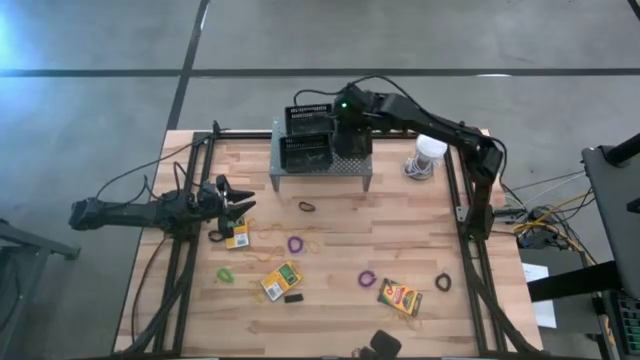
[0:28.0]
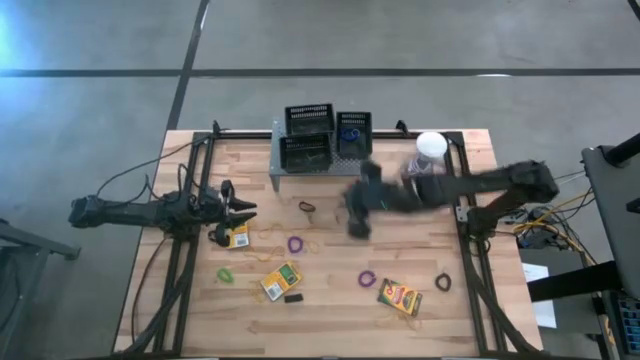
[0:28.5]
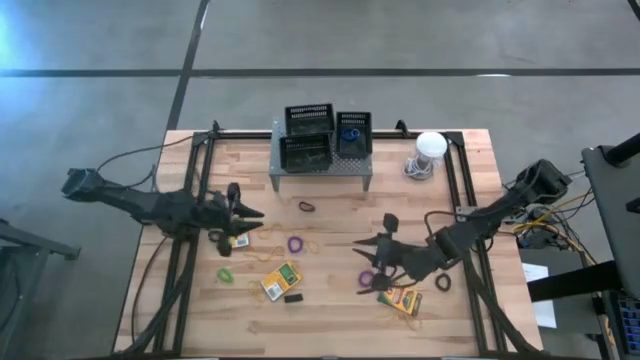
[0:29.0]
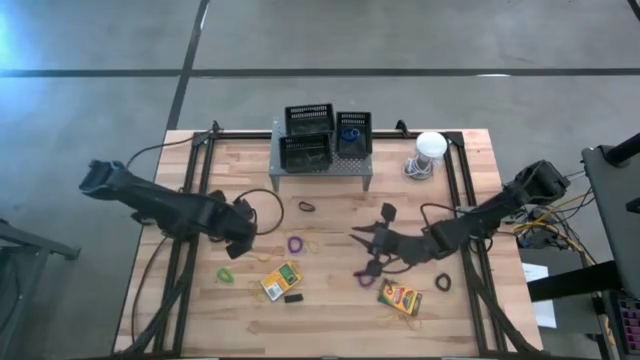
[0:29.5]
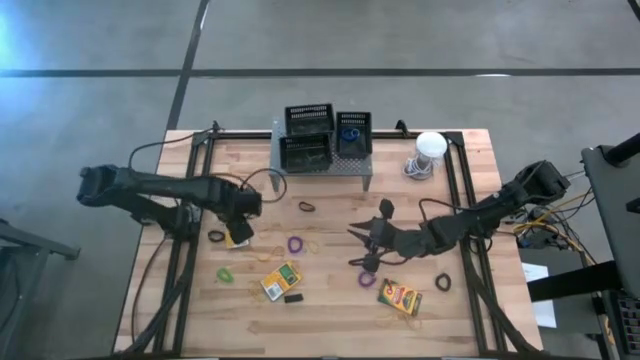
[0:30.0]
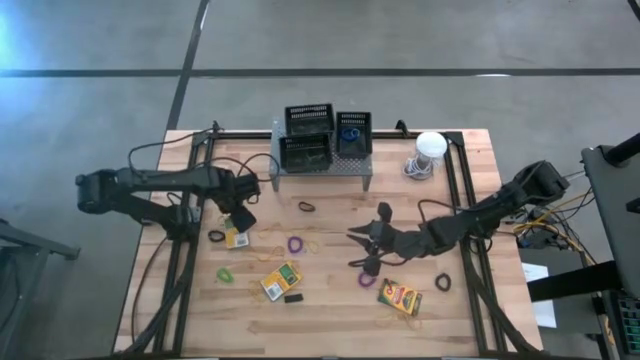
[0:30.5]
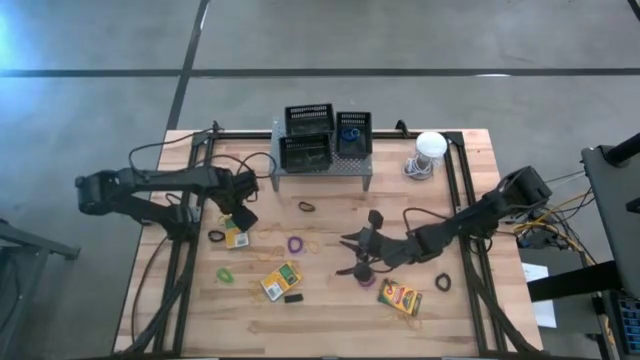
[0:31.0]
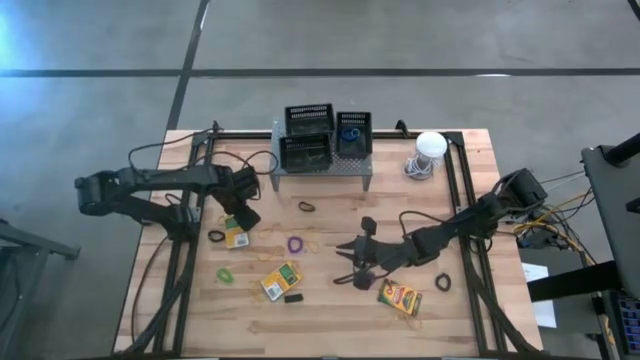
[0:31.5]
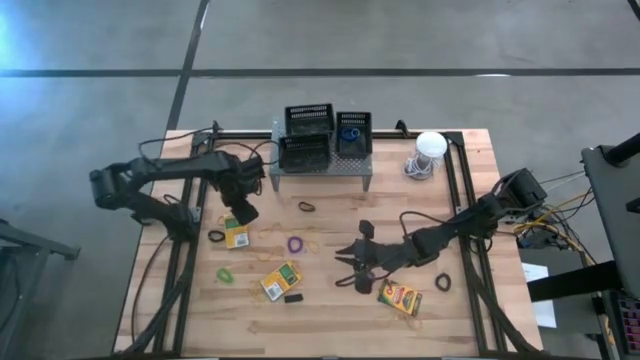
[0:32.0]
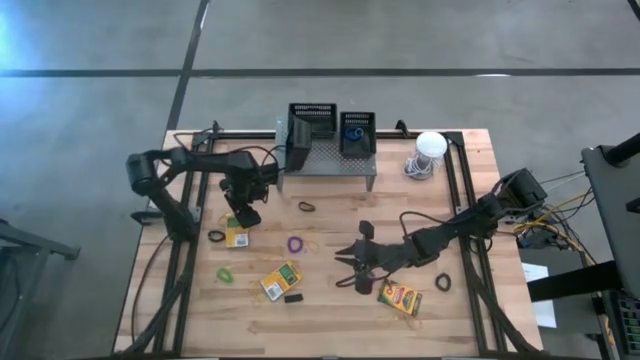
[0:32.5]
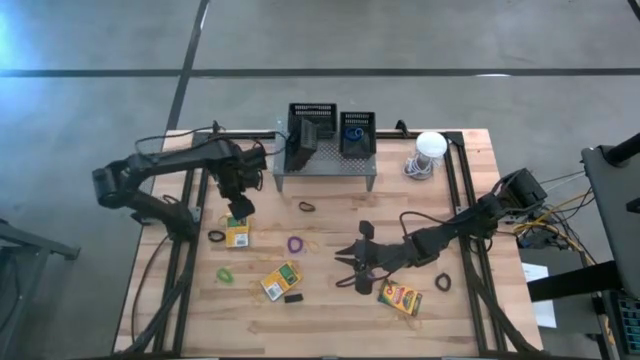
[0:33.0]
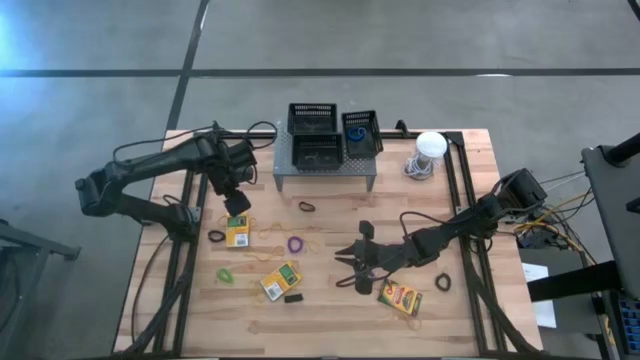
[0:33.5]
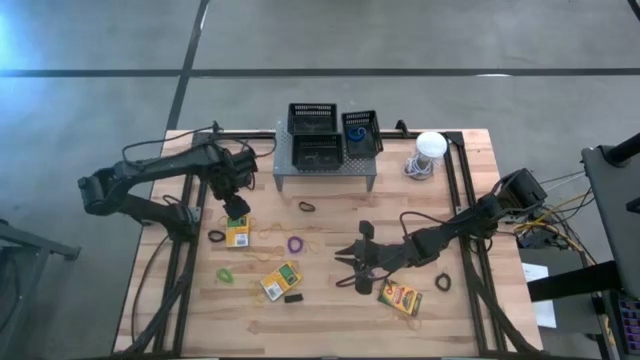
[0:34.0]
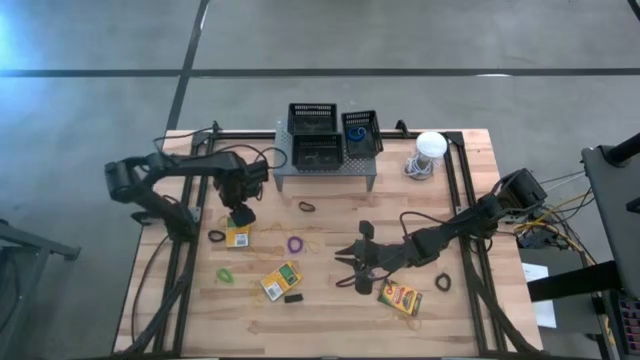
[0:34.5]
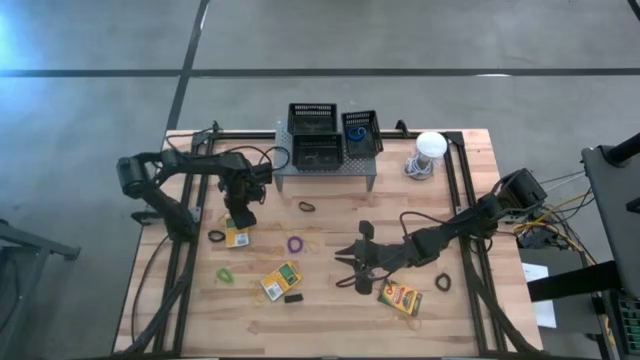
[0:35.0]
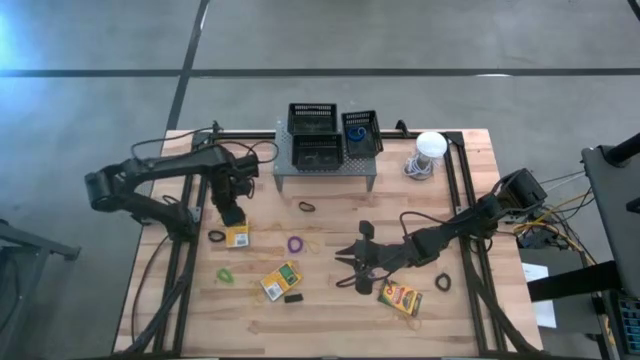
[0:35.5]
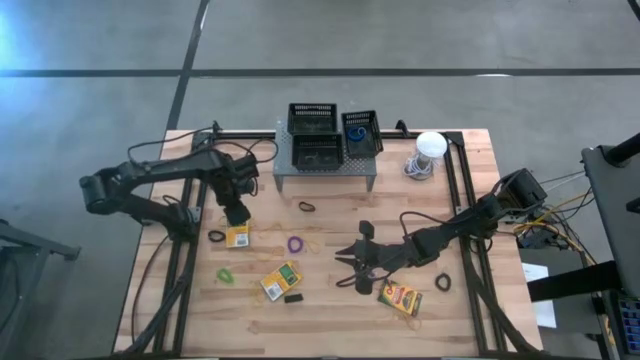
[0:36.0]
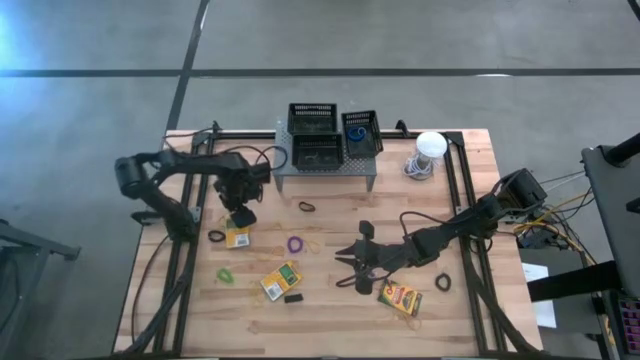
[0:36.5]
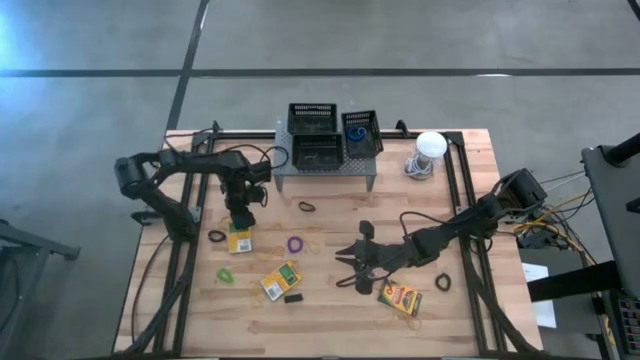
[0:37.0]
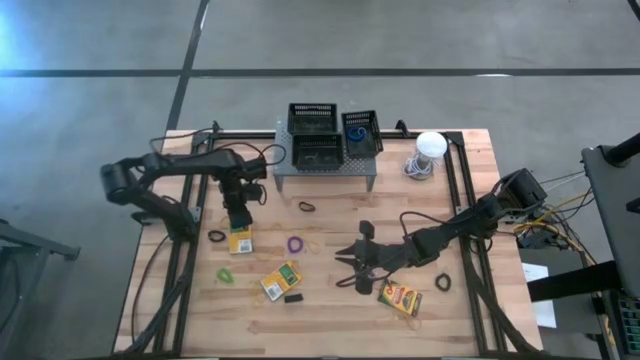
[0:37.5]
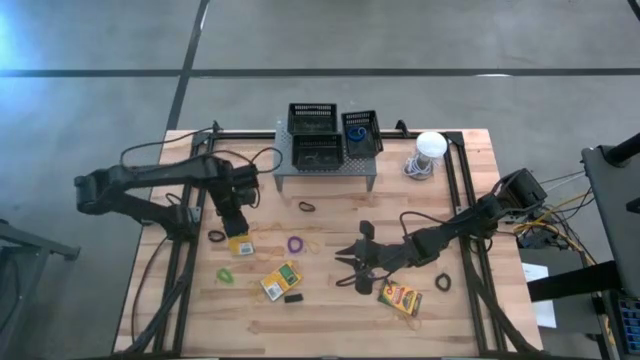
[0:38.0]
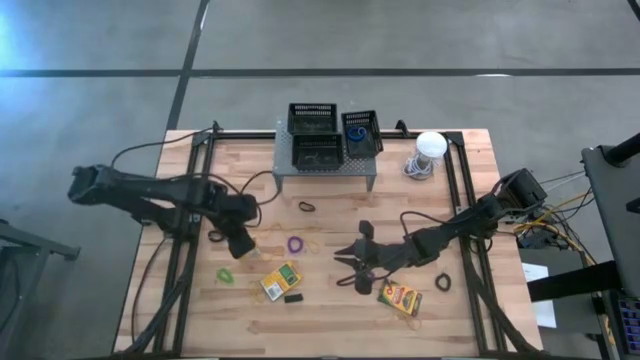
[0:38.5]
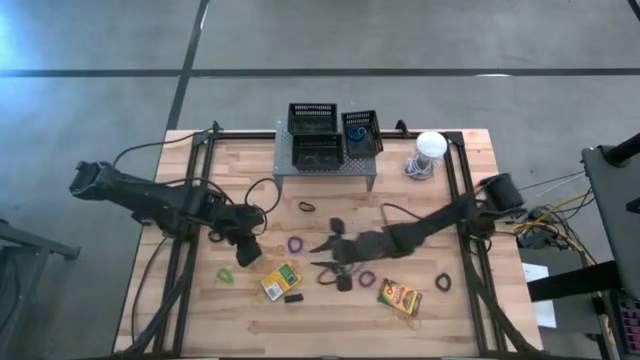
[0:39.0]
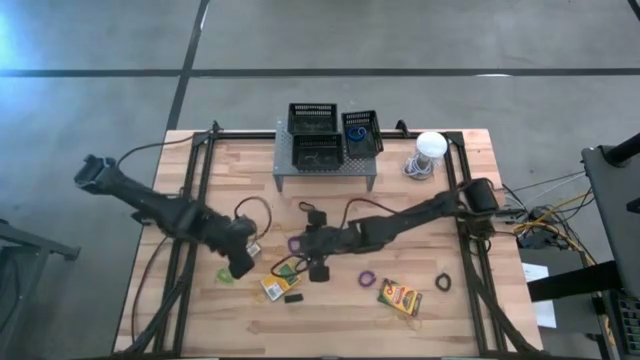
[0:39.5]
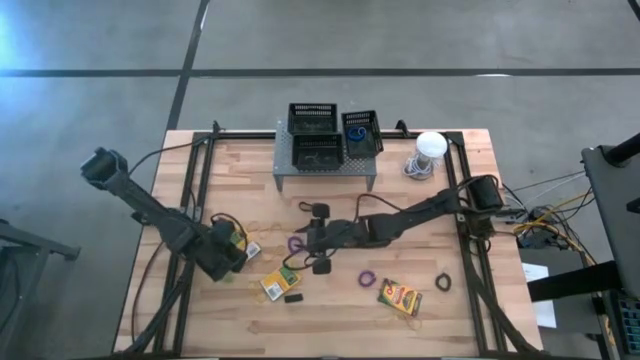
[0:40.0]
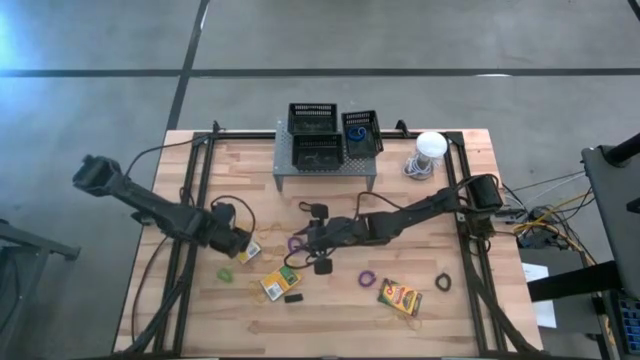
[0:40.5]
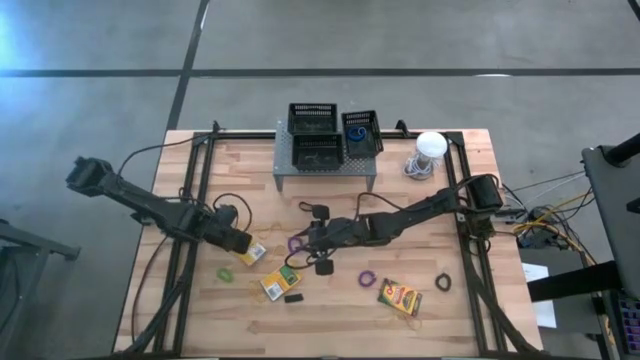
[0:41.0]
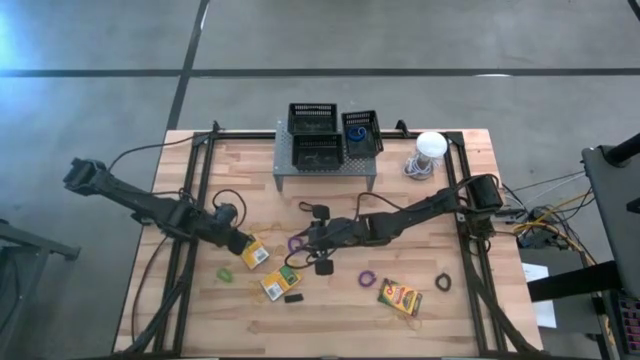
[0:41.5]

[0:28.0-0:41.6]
Task: Pick & Place Office Desk Supplies
Put the crayon box into the top left black bin

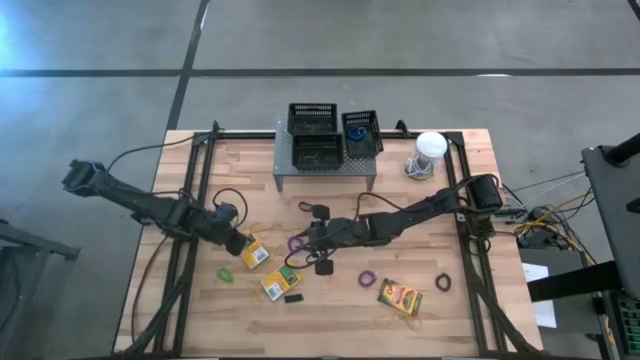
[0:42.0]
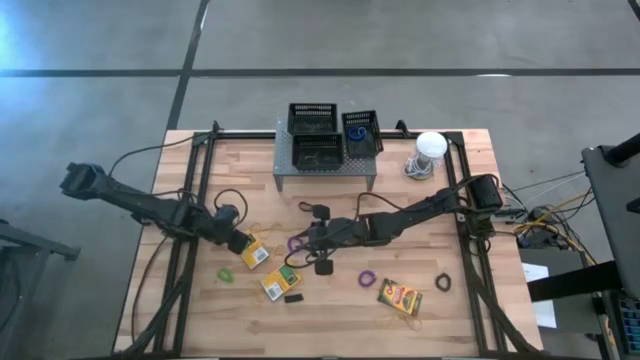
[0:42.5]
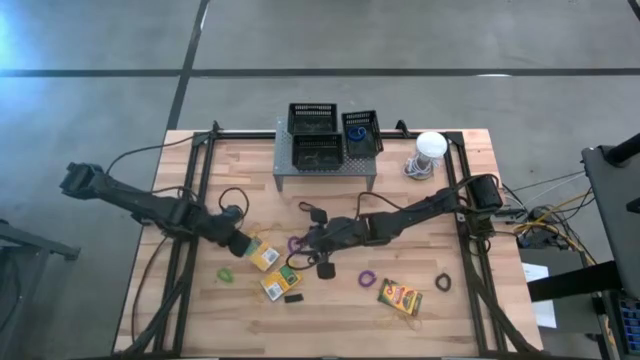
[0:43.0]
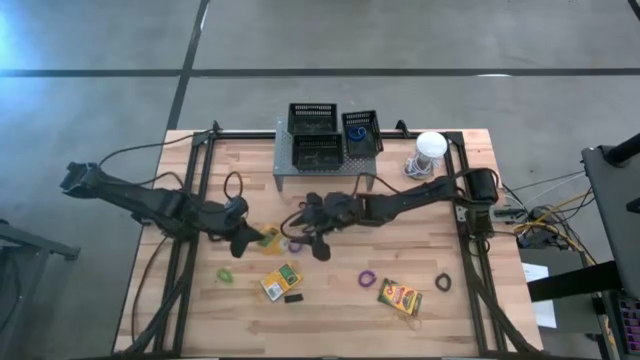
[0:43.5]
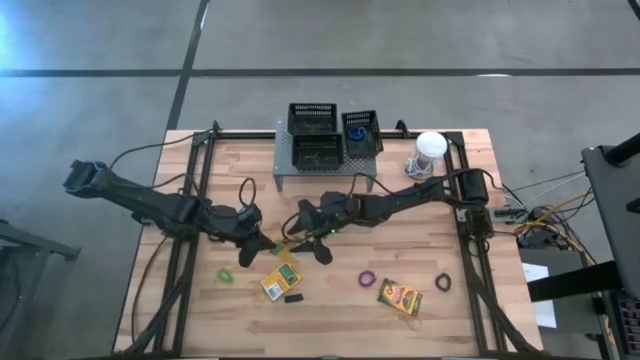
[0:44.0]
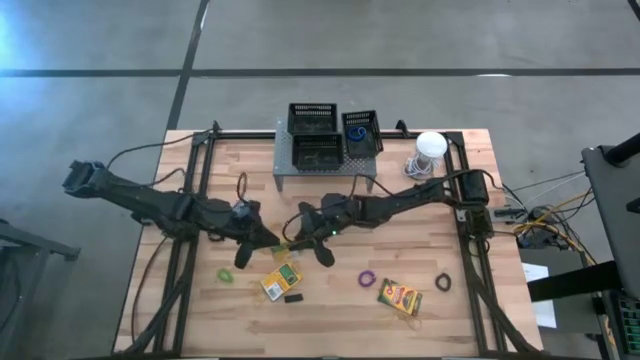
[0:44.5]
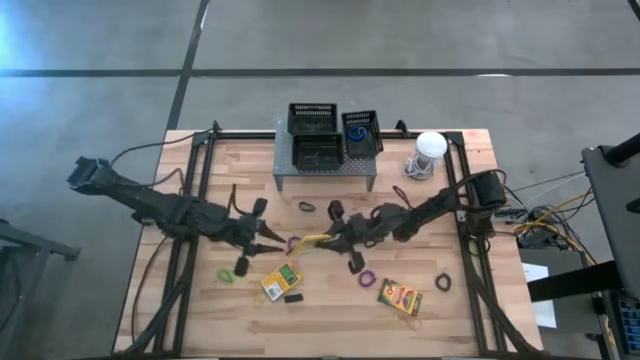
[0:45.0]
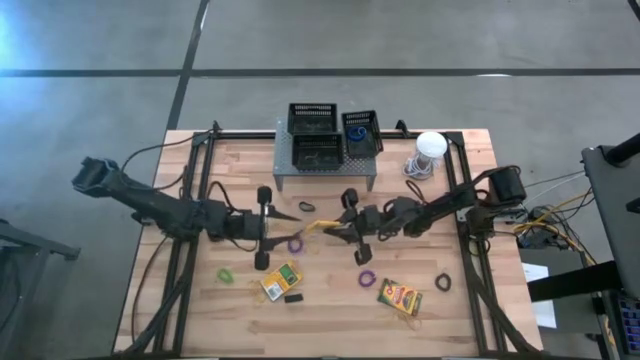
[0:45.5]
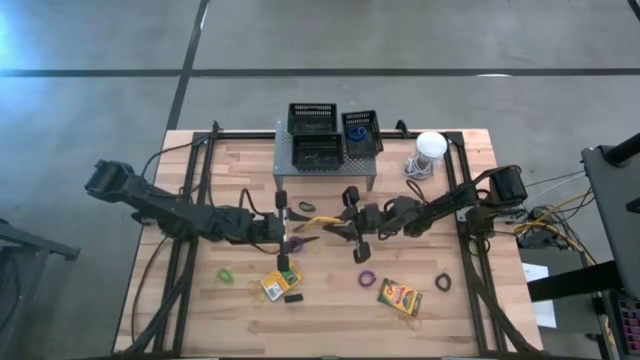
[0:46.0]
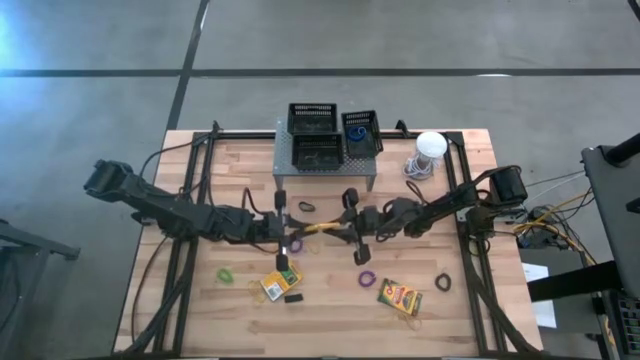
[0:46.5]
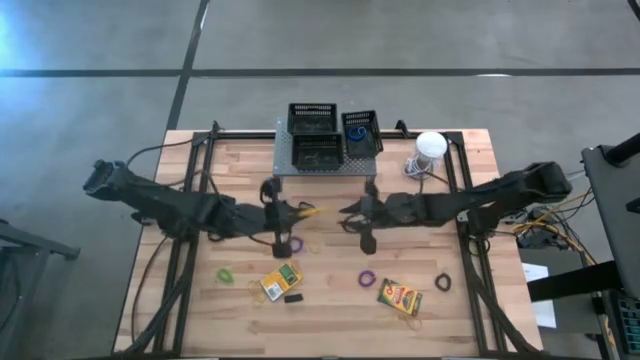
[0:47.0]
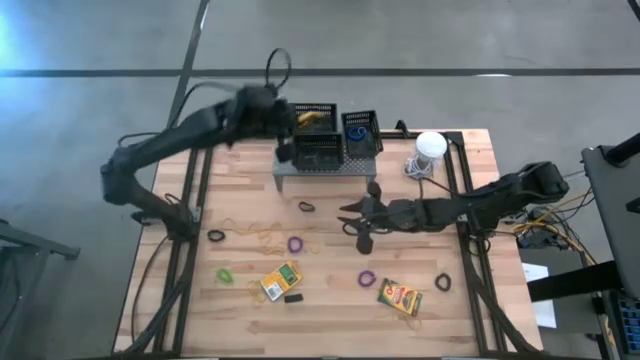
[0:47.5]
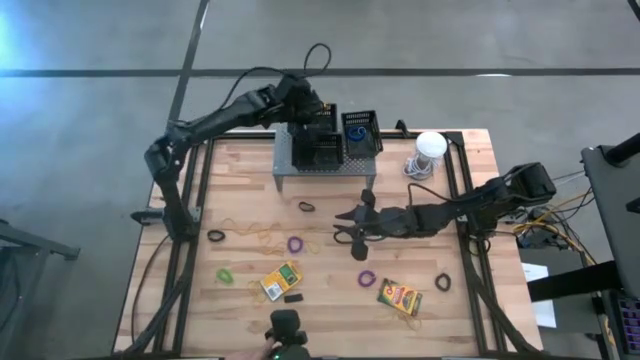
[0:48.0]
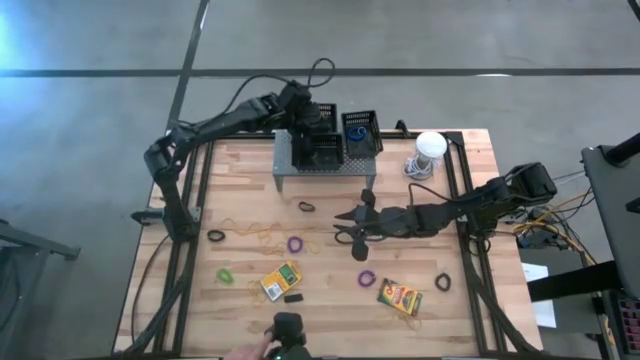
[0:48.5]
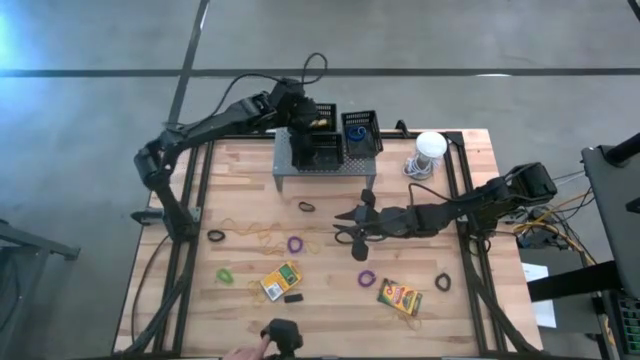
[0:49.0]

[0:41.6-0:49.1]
Put the crayon box in the top left black bin
